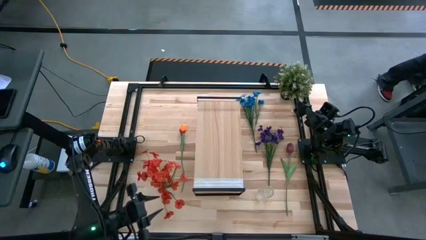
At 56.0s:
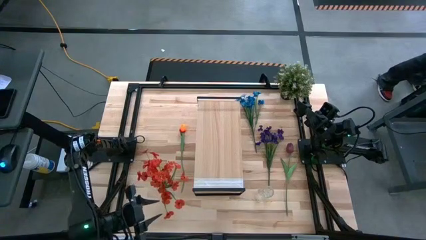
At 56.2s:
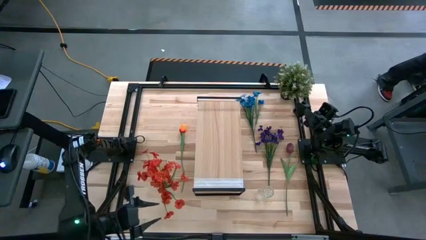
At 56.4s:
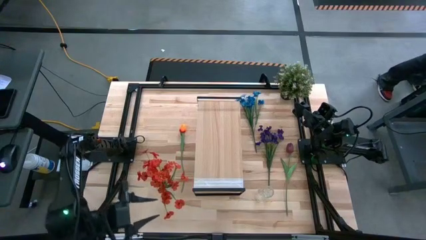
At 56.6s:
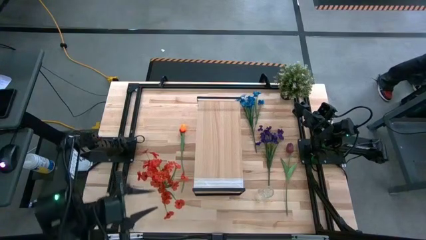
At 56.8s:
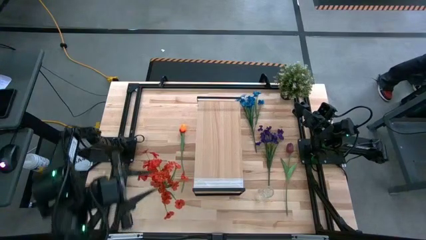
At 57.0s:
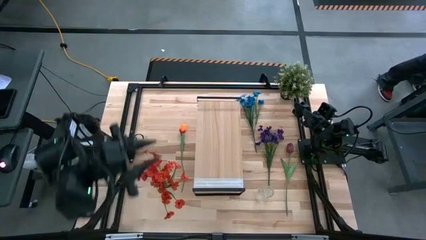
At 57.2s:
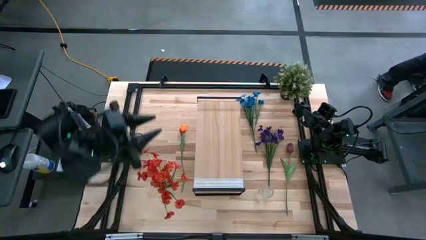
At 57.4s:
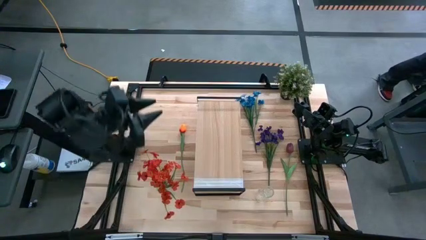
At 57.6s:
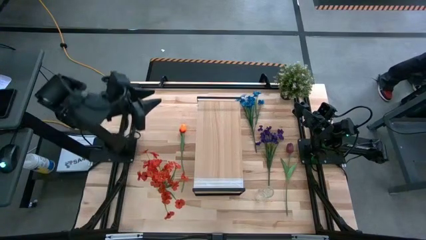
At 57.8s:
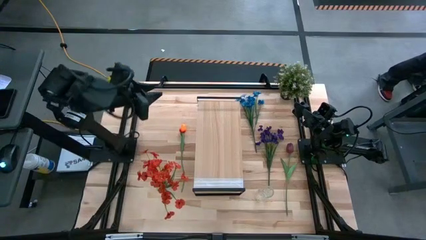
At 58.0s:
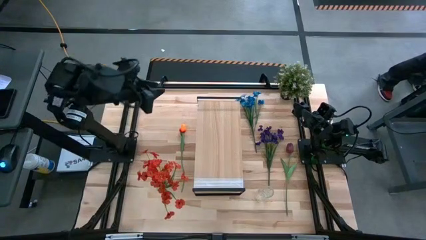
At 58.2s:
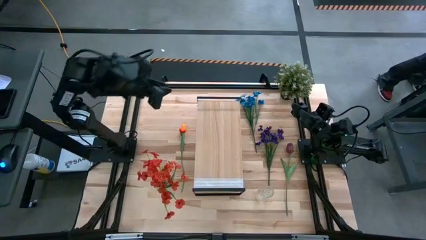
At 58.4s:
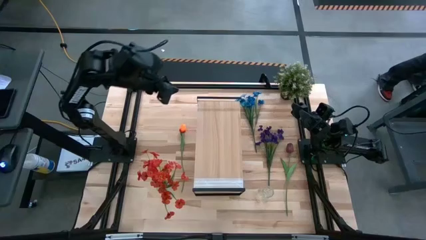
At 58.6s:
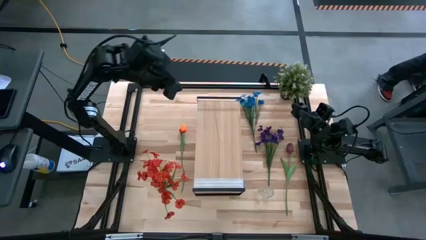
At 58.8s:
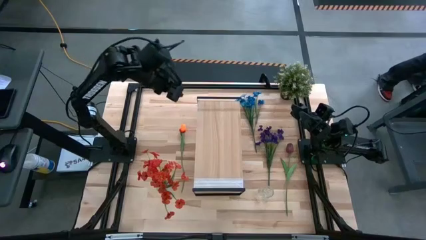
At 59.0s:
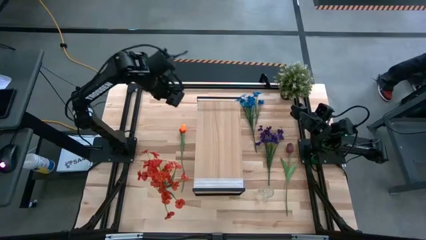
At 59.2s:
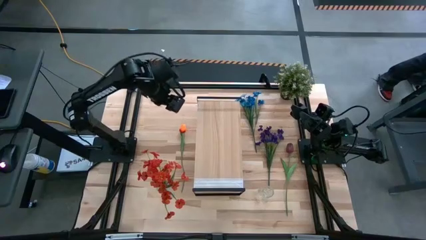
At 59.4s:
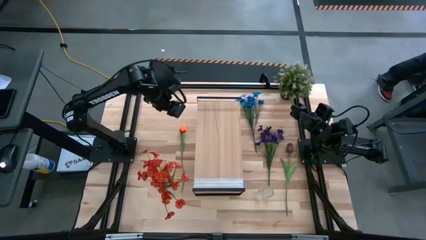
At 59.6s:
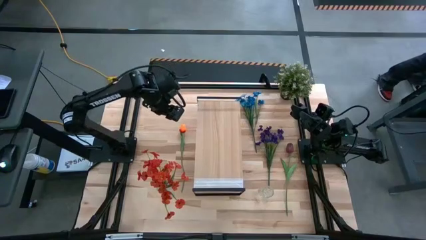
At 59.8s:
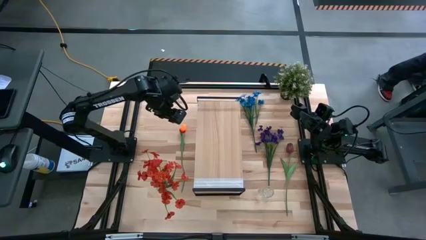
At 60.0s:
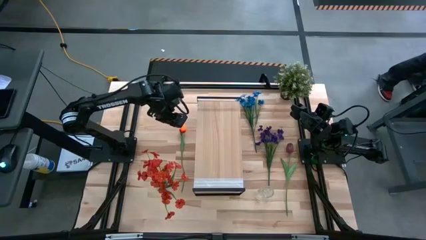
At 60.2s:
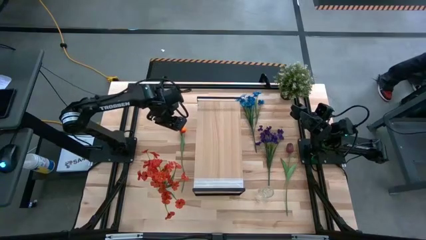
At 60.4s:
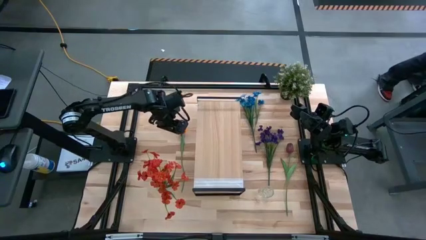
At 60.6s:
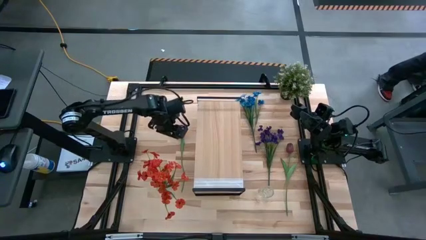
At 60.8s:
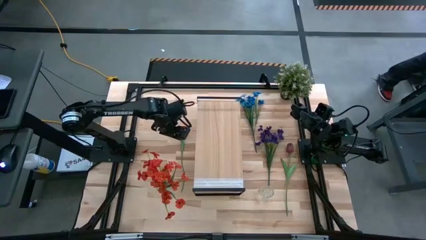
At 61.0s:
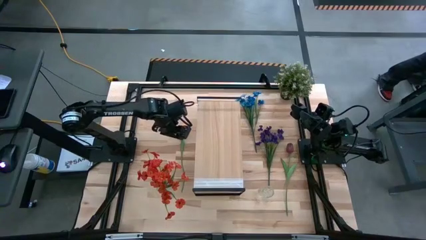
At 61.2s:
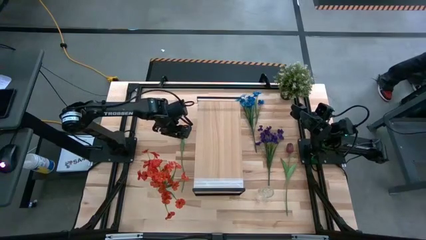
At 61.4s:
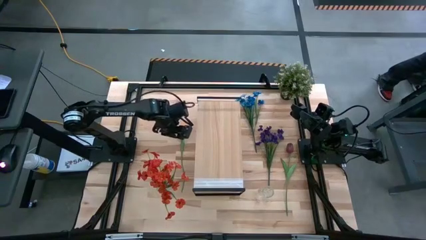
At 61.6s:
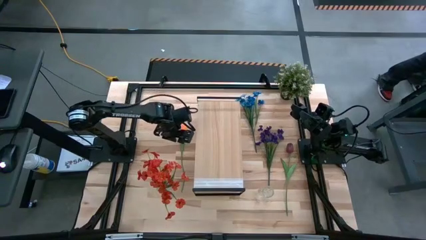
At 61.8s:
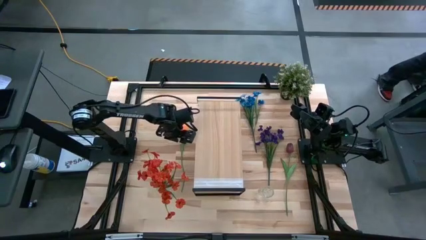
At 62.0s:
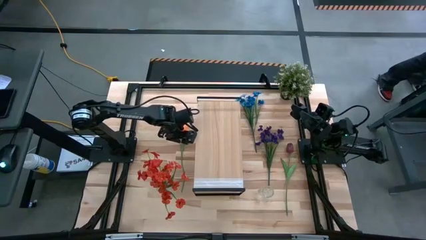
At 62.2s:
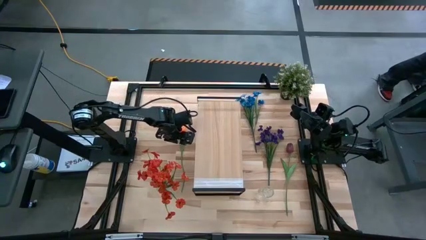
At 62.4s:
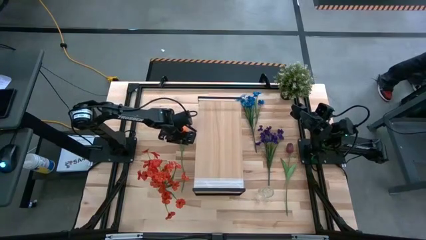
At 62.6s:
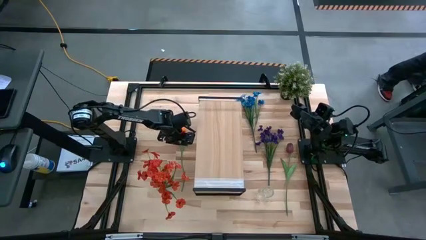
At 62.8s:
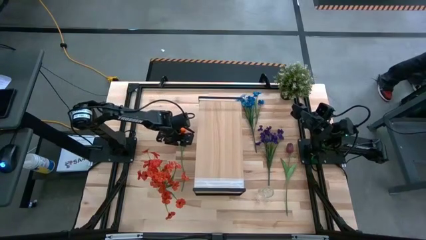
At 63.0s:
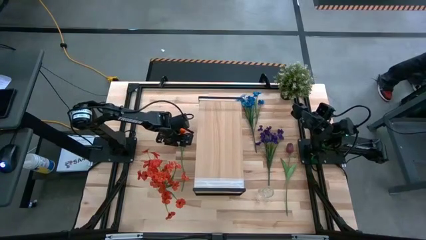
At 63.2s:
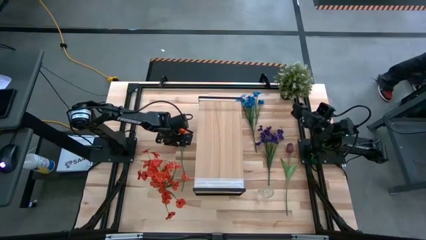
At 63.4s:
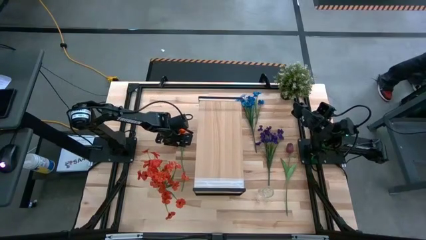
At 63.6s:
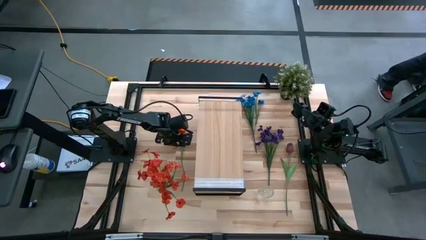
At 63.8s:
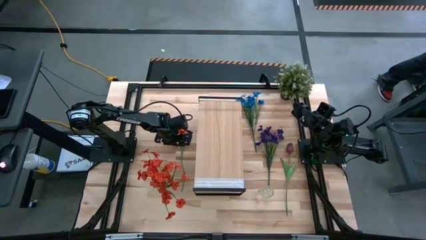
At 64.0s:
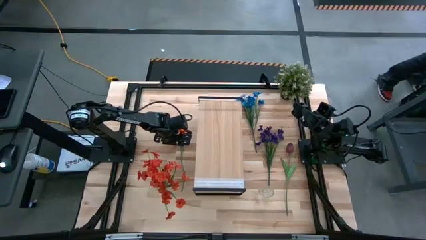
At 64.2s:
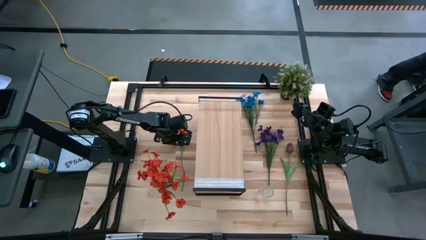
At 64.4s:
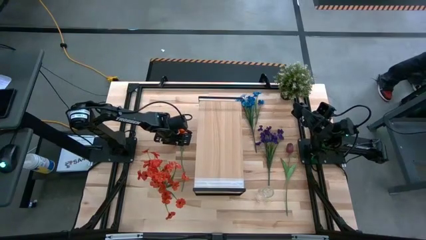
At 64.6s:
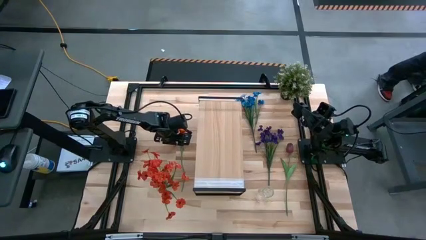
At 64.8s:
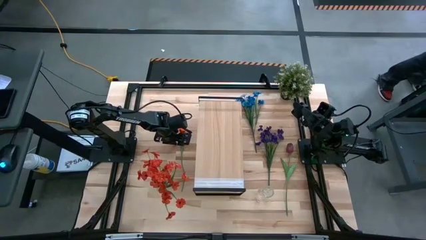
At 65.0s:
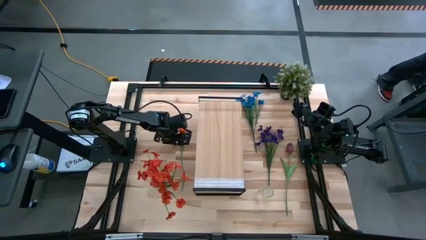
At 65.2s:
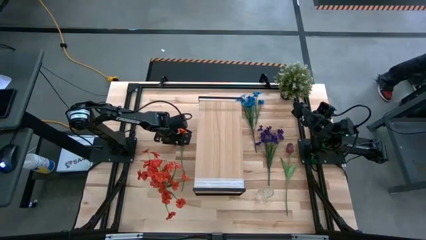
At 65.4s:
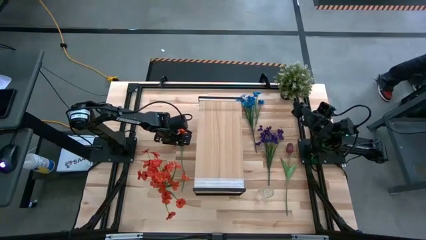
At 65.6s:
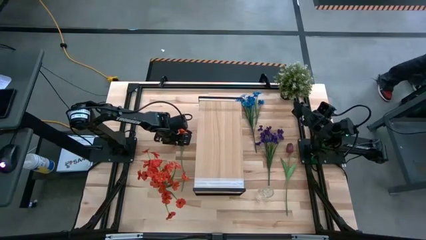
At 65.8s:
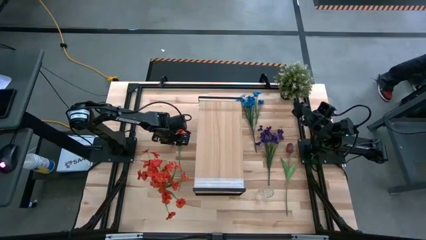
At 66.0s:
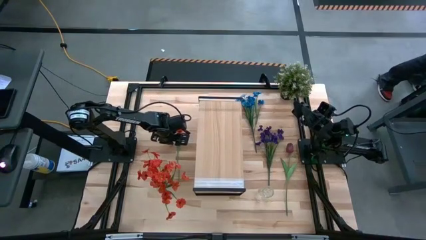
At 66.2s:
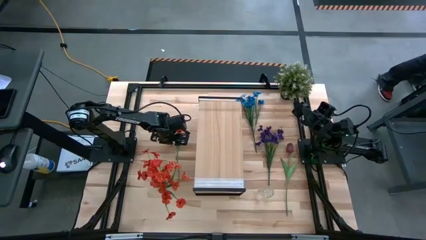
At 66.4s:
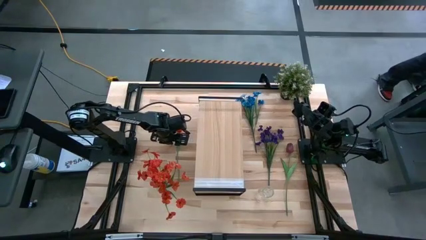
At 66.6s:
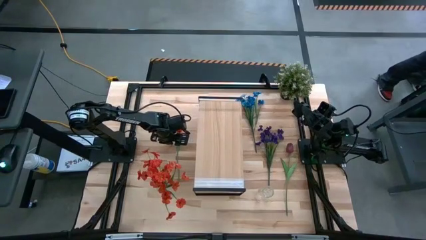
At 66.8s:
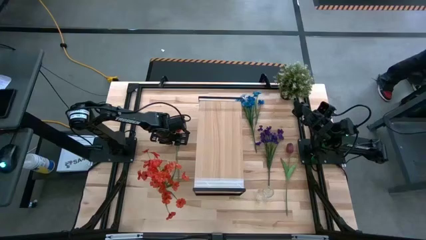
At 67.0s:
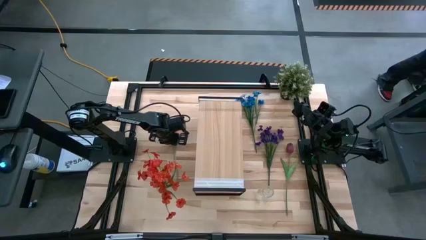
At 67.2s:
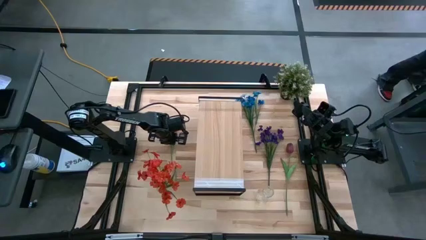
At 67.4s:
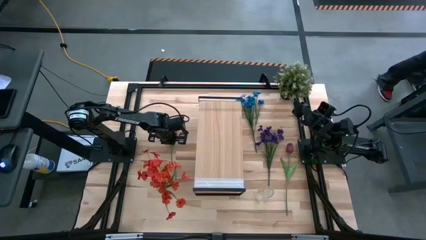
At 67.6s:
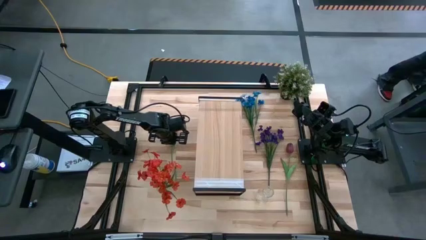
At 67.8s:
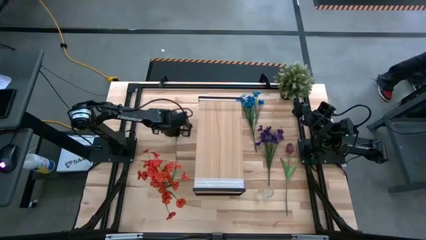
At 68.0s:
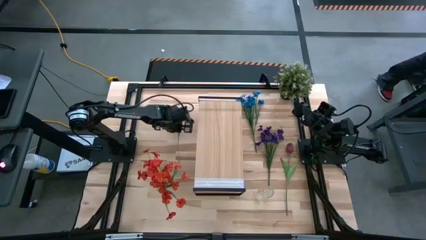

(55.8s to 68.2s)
Task: Pick and place flowers into a vace then onto a shelf
Put the light orange flower into the left transparent vase

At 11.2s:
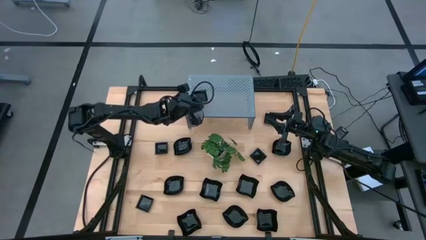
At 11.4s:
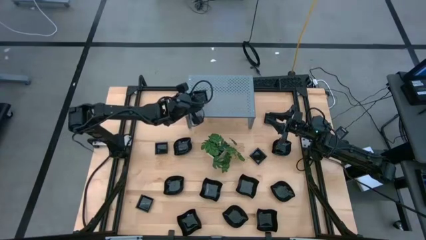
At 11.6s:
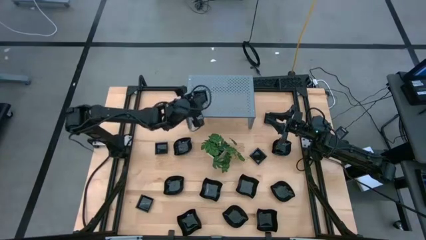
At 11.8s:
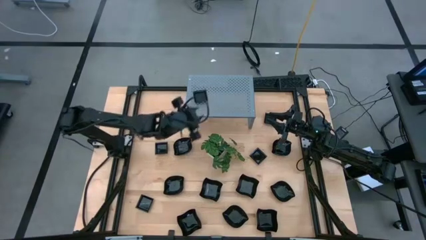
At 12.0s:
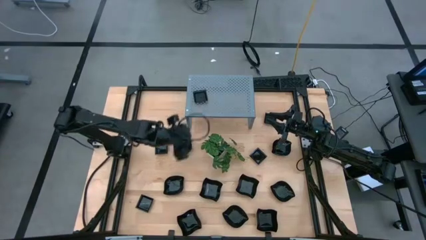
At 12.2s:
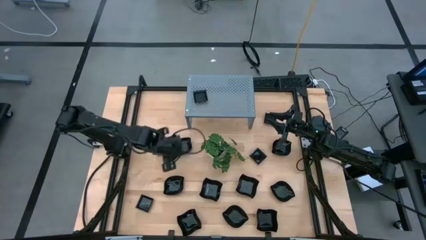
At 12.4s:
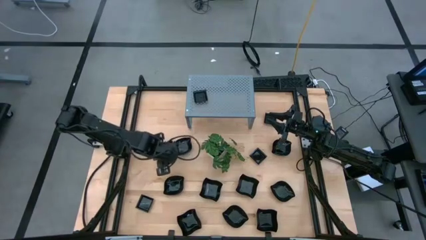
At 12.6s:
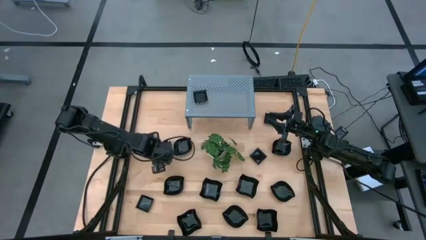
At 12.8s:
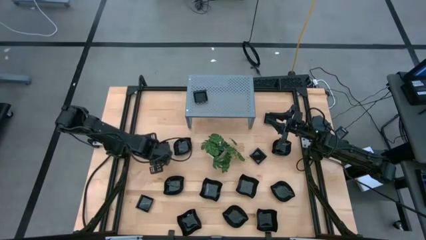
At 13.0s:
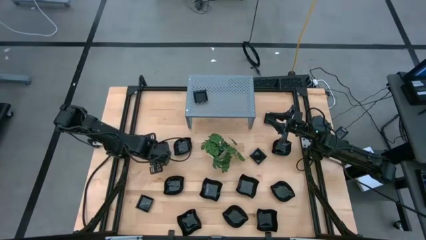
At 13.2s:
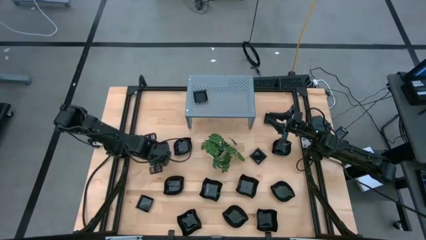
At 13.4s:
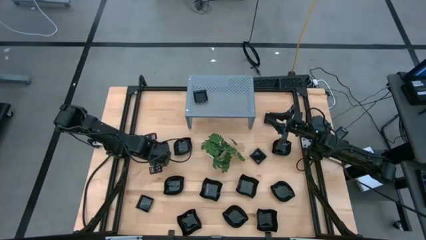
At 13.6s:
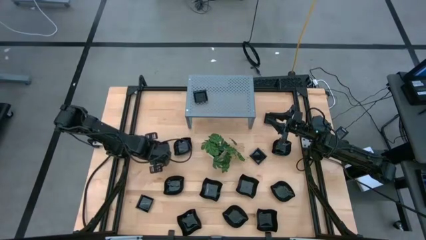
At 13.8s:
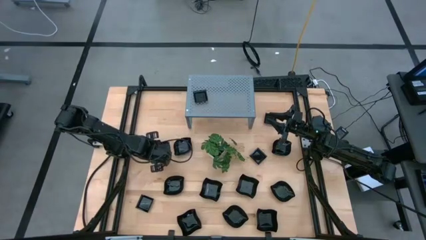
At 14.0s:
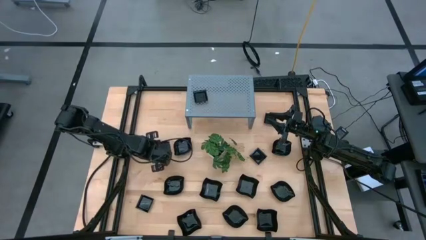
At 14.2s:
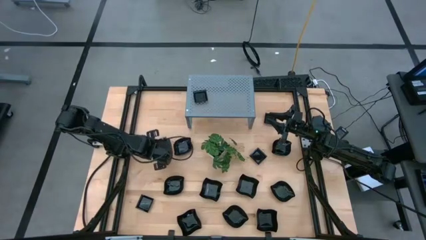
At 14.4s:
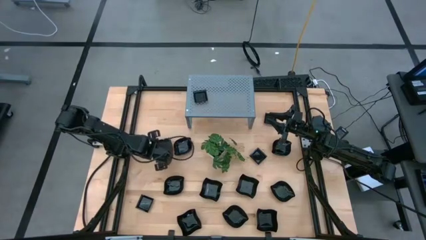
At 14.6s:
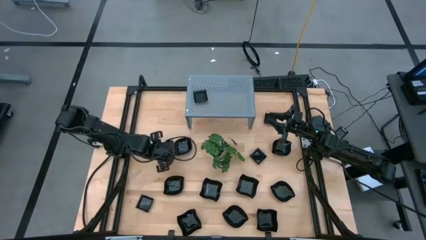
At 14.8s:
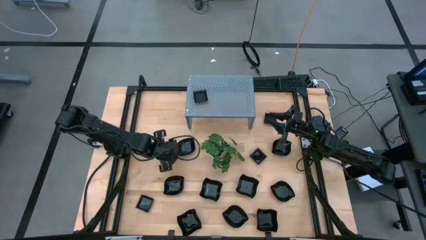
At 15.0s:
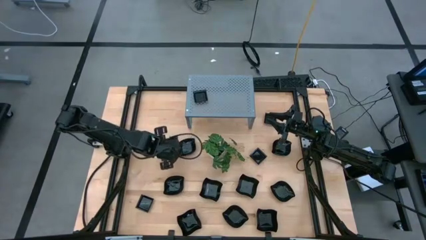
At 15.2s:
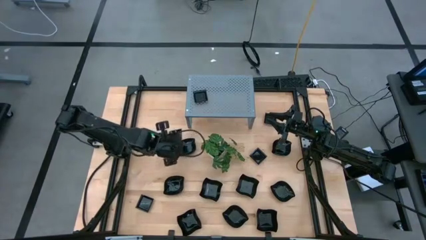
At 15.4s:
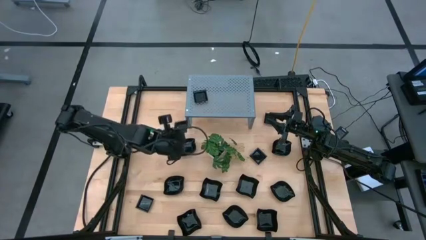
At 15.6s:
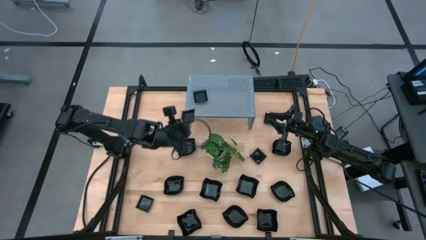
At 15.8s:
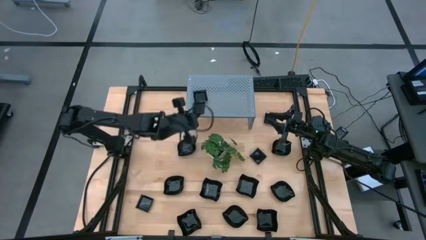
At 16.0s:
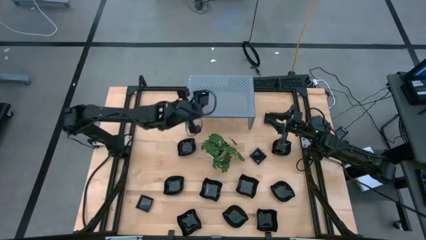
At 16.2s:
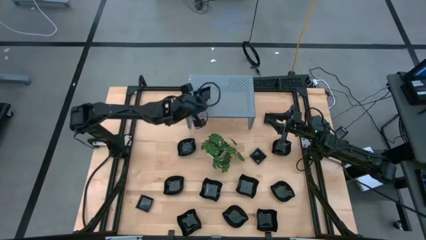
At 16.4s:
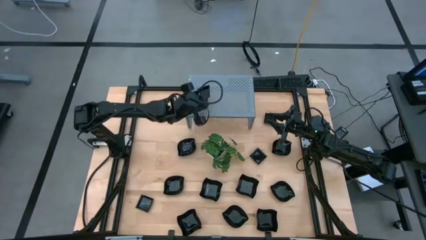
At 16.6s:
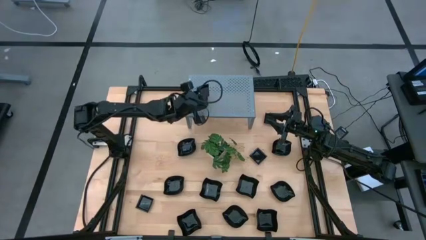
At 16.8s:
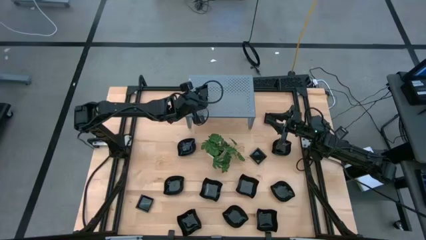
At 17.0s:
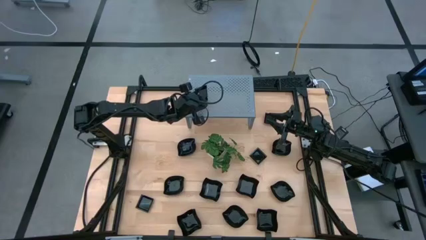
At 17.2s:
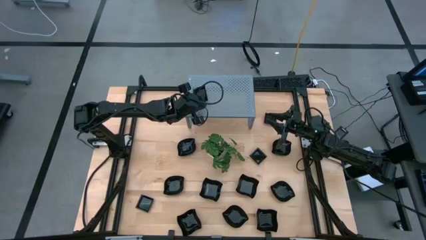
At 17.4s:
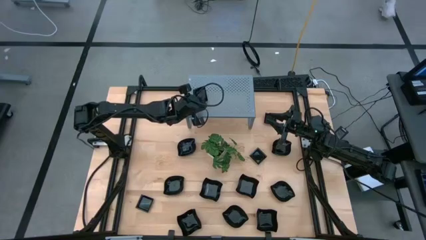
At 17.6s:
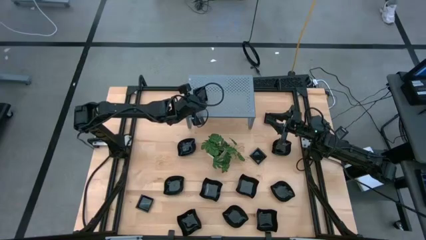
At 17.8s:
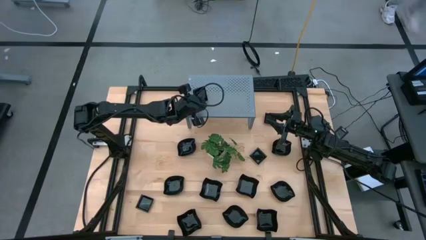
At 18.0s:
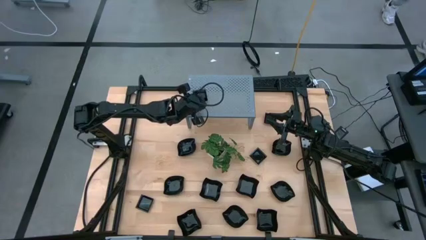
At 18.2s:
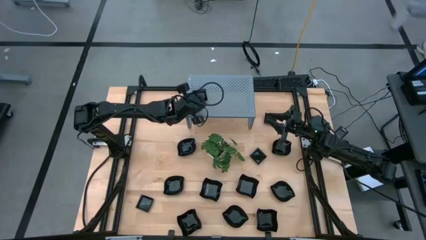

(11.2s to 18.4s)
Task: Pick & Place Mini shaped plates
Stack the black square plate on top of the other black square plate on the shelf
